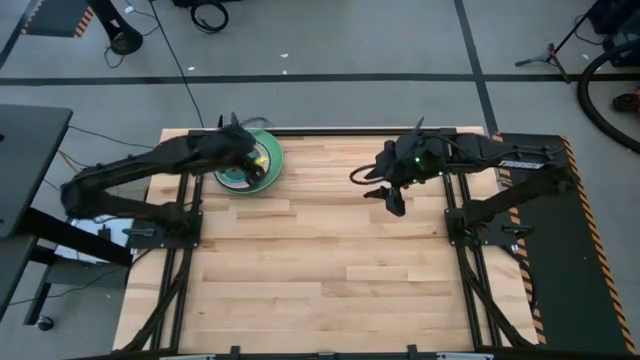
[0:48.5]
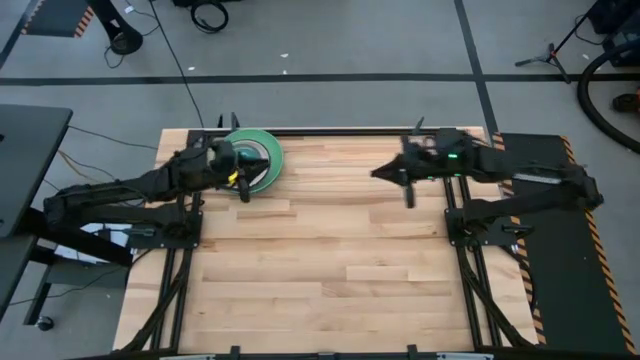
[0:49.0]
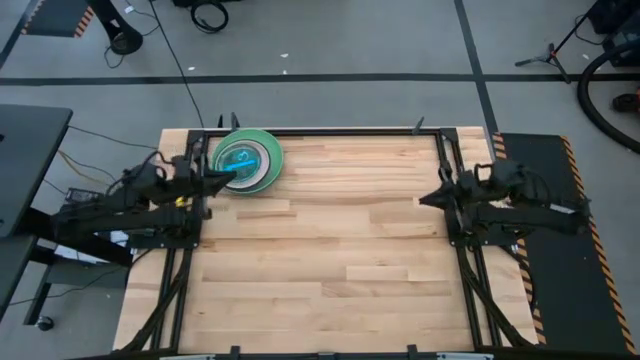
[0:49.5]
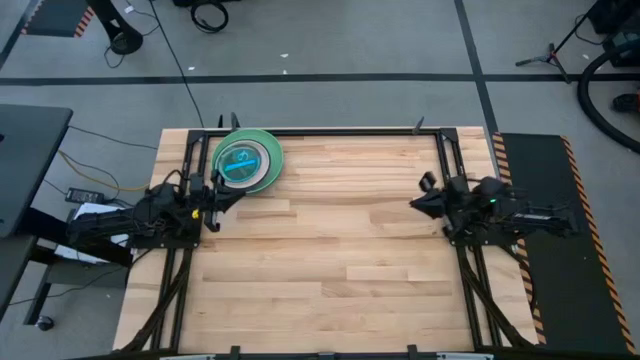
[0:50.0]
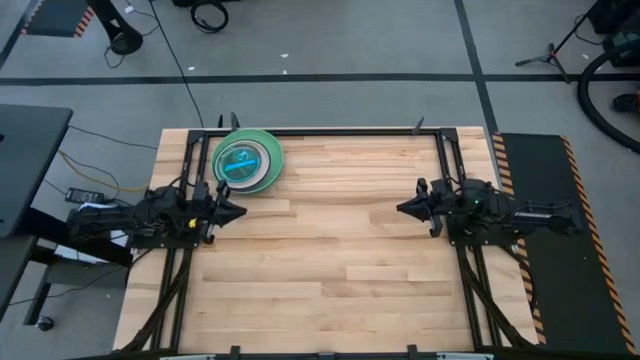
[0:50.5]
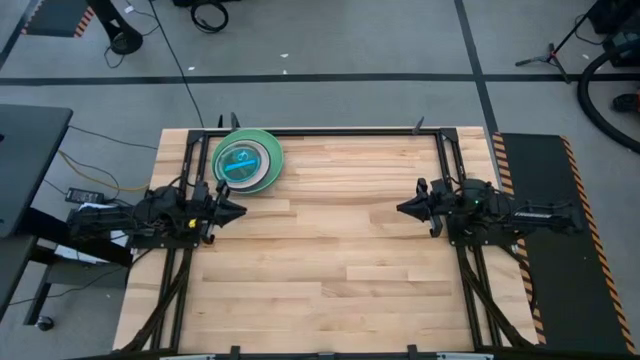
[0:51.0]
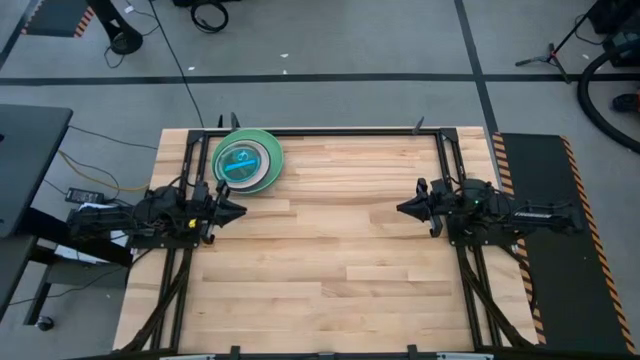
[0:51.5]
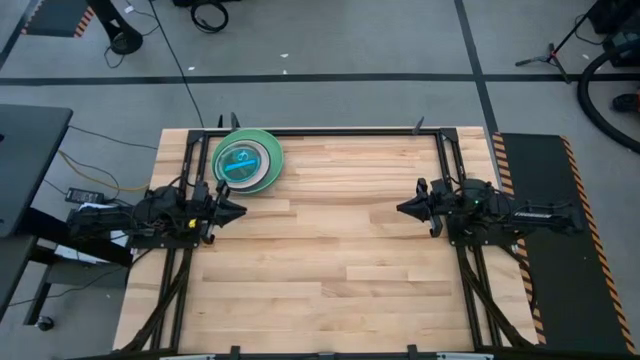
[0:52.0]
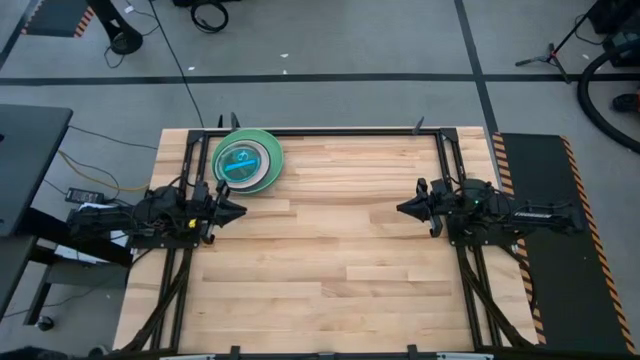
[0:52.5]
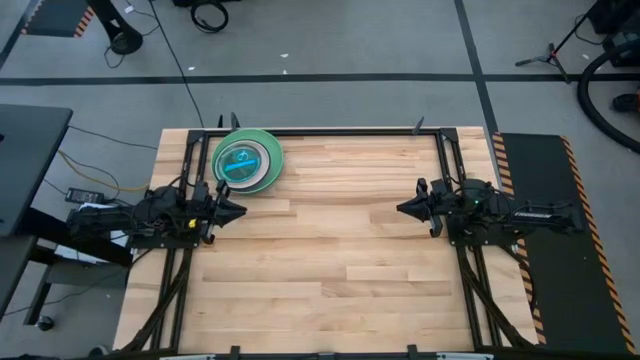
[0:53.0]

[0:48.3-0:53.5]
Task: Stack plastic plates
Return to Home Position

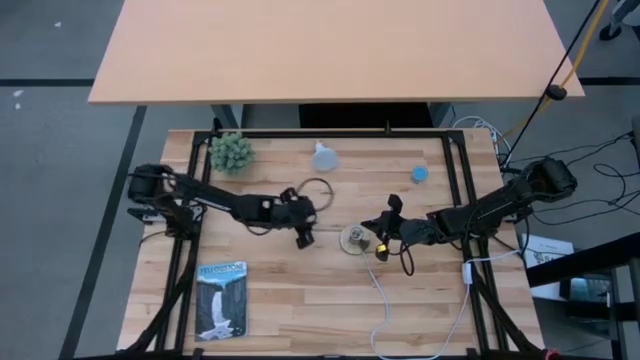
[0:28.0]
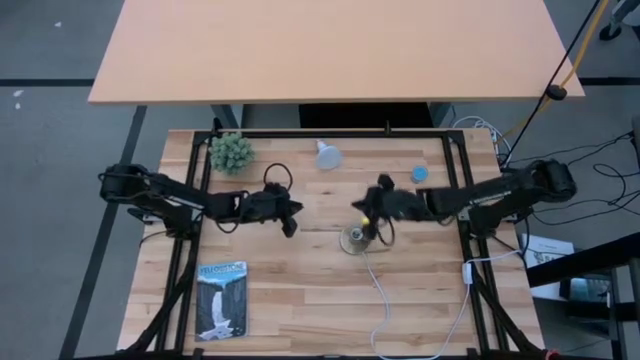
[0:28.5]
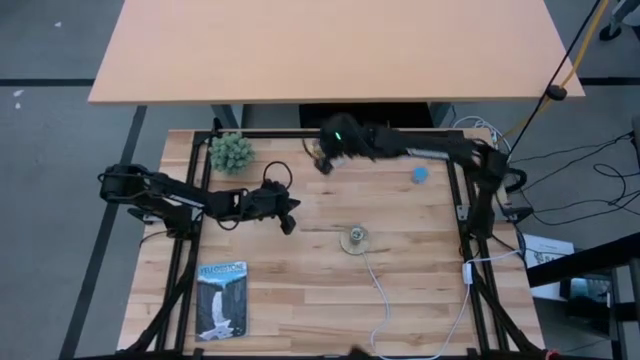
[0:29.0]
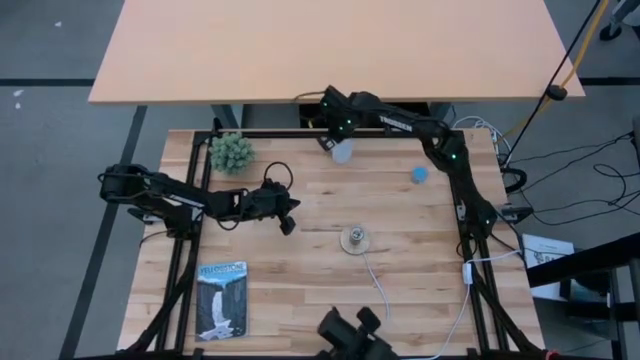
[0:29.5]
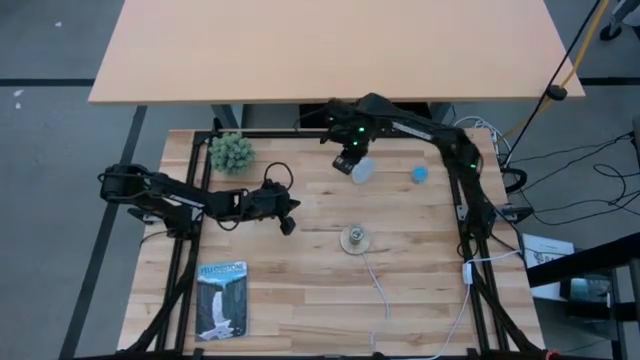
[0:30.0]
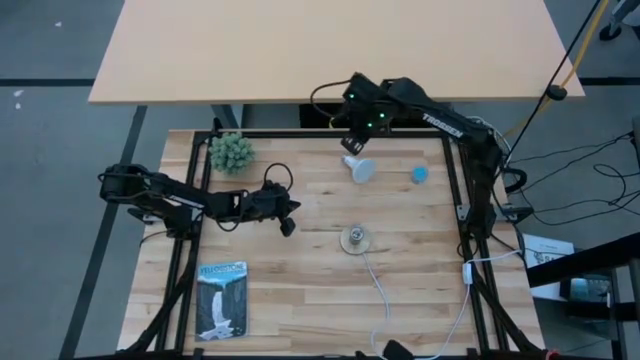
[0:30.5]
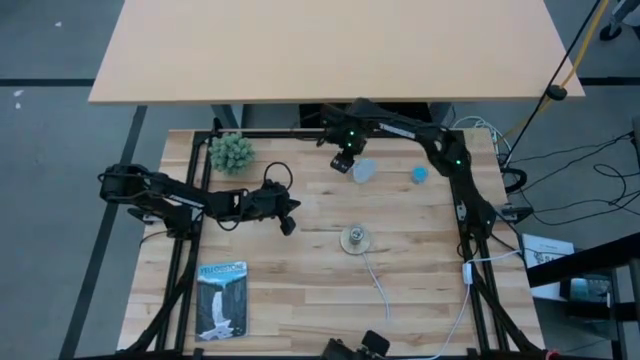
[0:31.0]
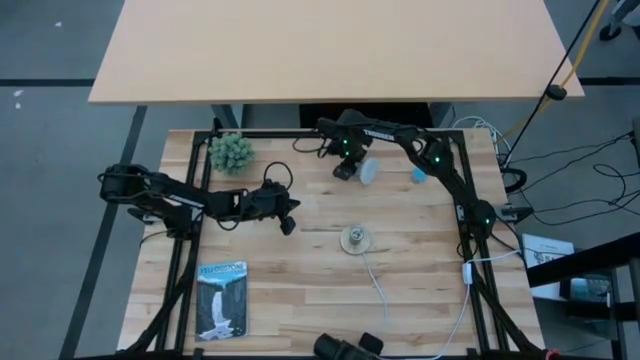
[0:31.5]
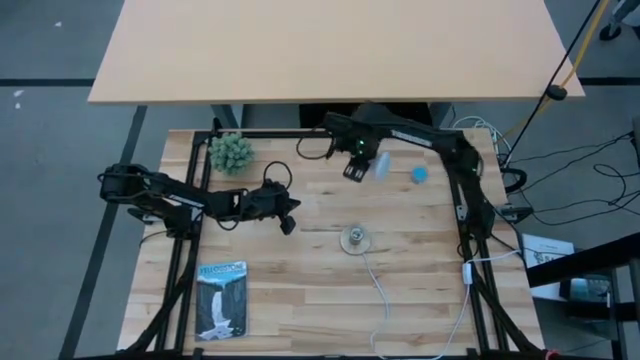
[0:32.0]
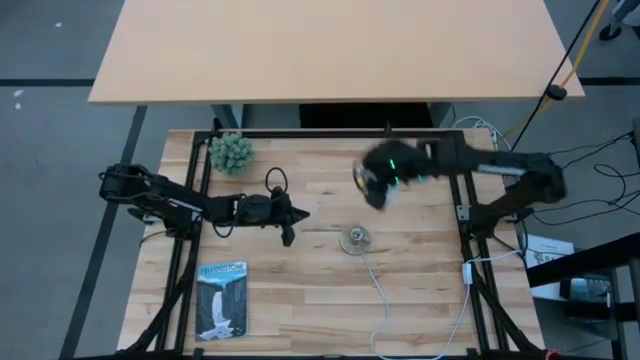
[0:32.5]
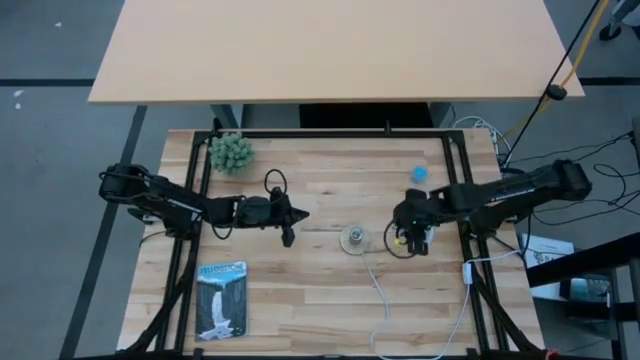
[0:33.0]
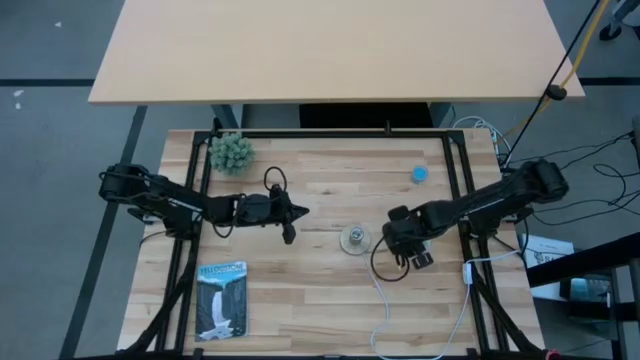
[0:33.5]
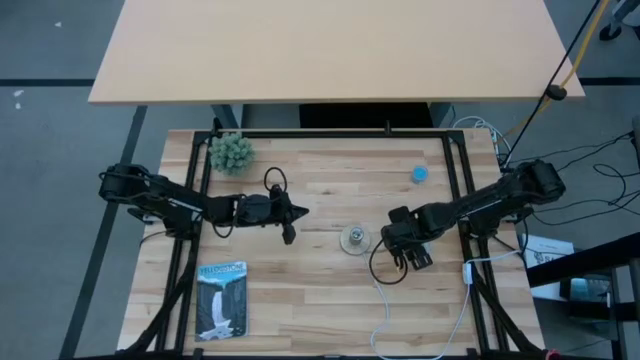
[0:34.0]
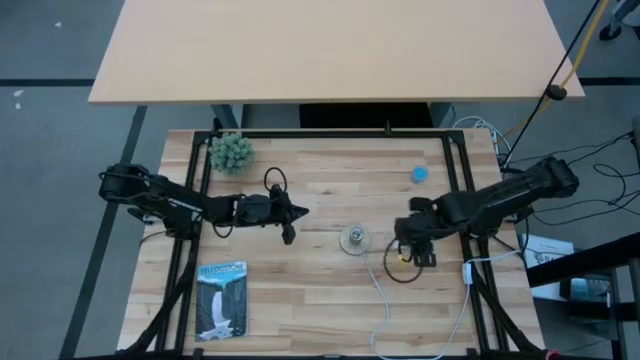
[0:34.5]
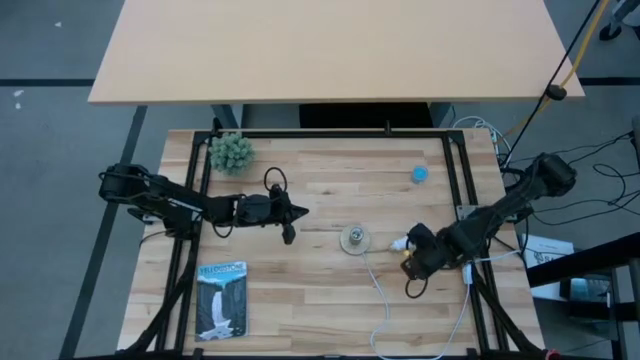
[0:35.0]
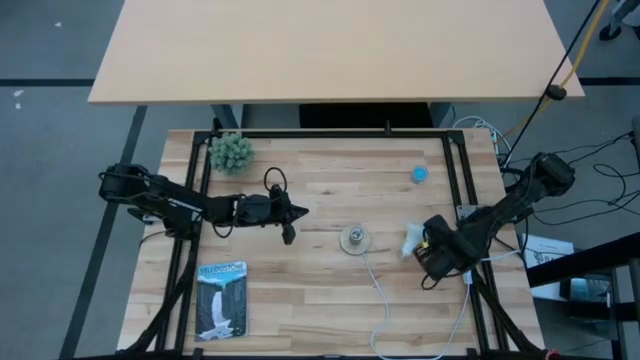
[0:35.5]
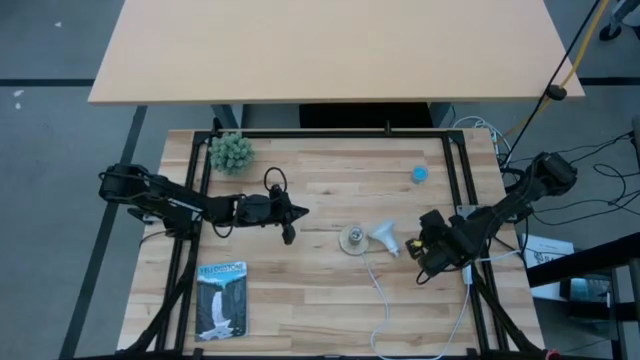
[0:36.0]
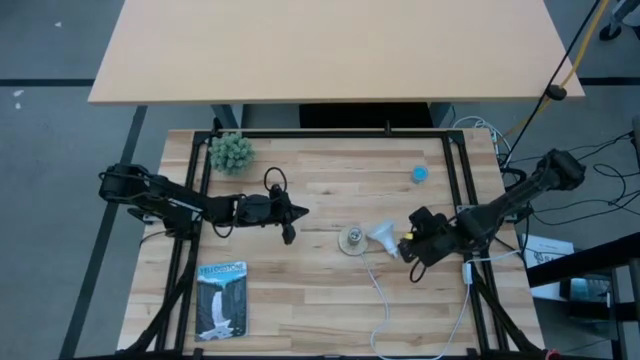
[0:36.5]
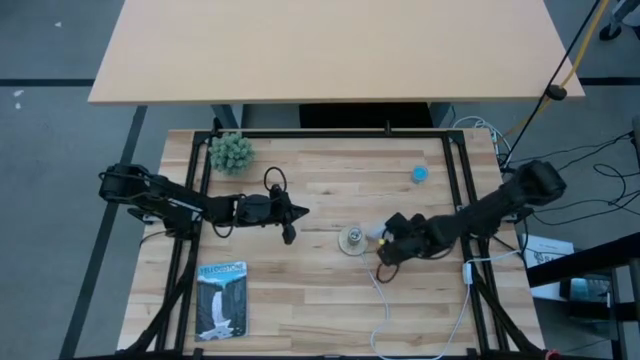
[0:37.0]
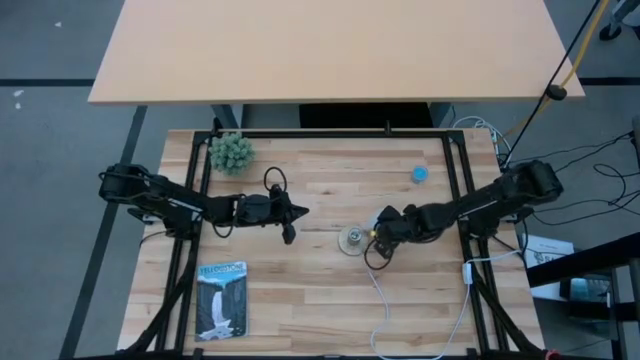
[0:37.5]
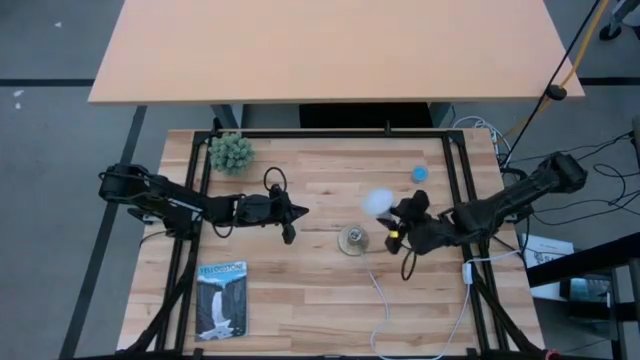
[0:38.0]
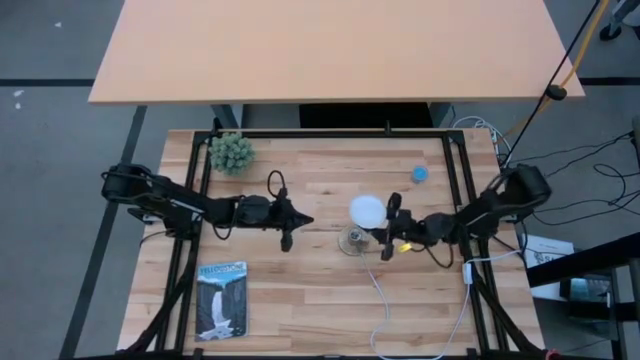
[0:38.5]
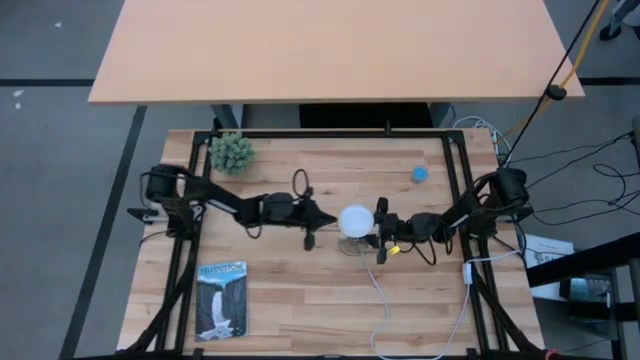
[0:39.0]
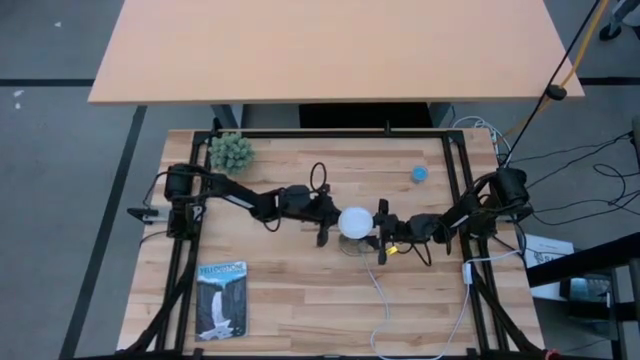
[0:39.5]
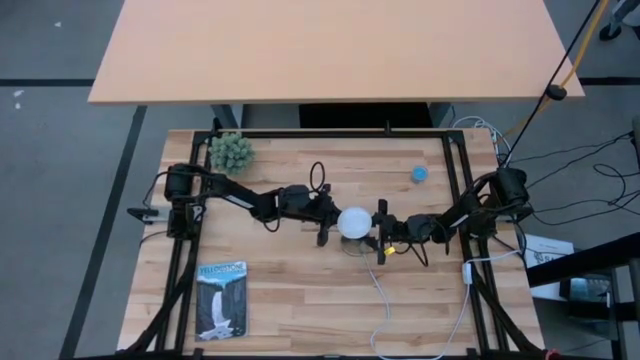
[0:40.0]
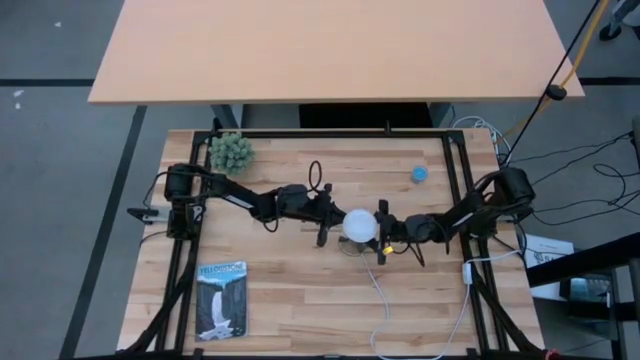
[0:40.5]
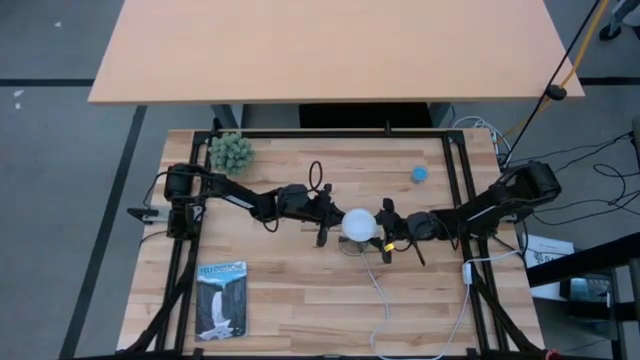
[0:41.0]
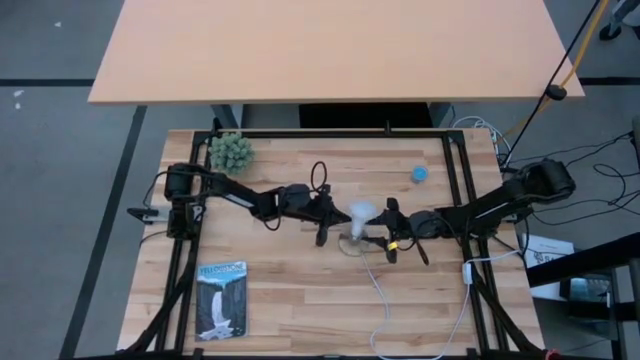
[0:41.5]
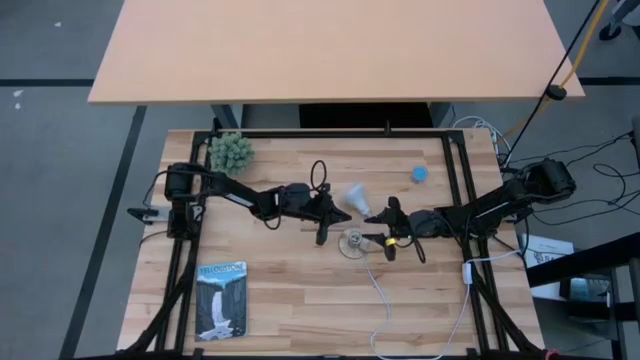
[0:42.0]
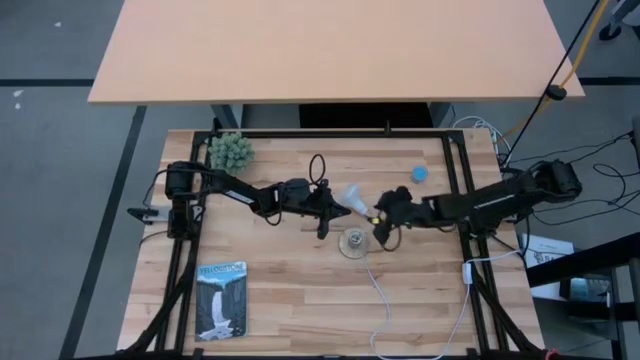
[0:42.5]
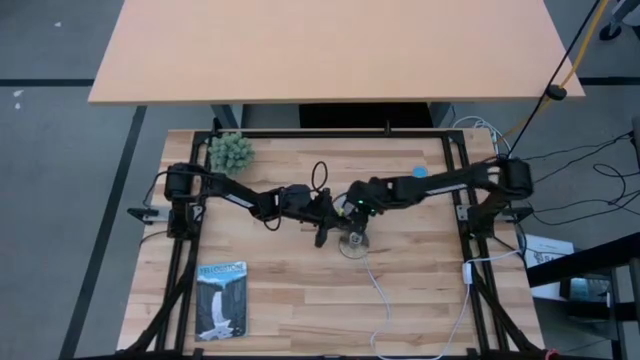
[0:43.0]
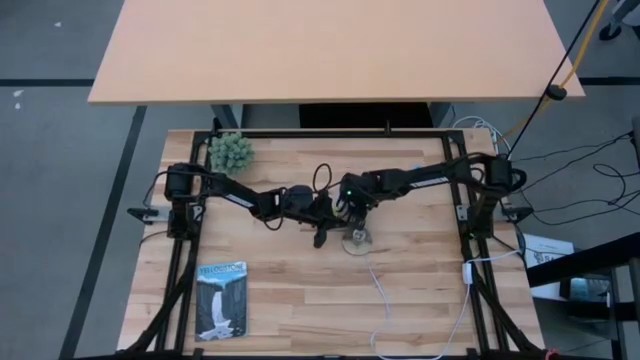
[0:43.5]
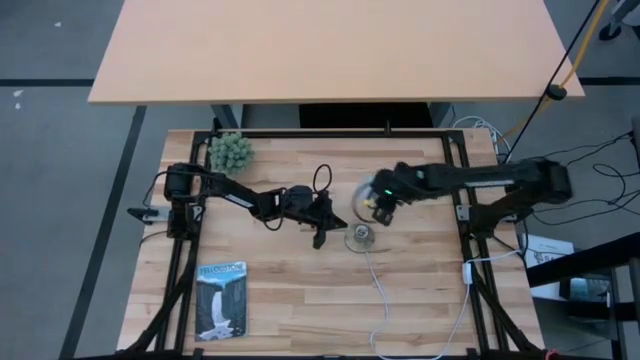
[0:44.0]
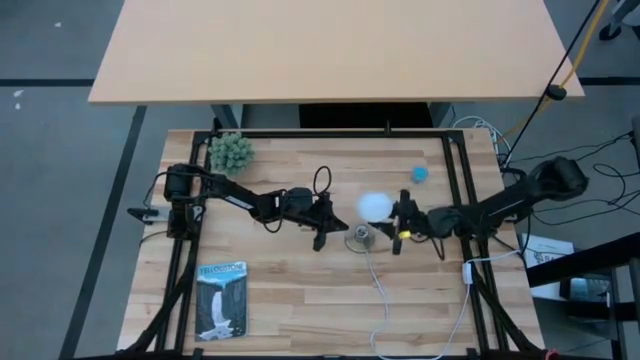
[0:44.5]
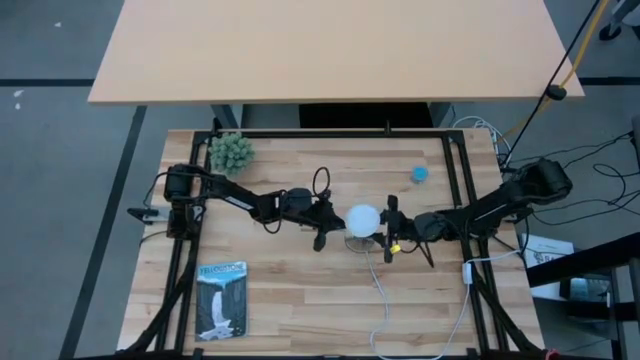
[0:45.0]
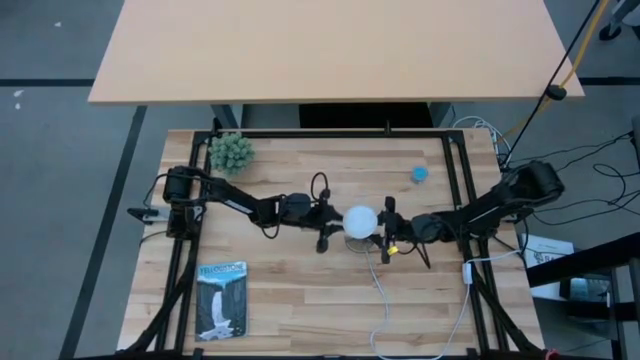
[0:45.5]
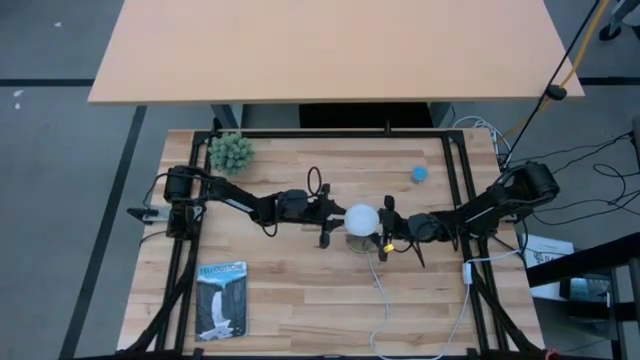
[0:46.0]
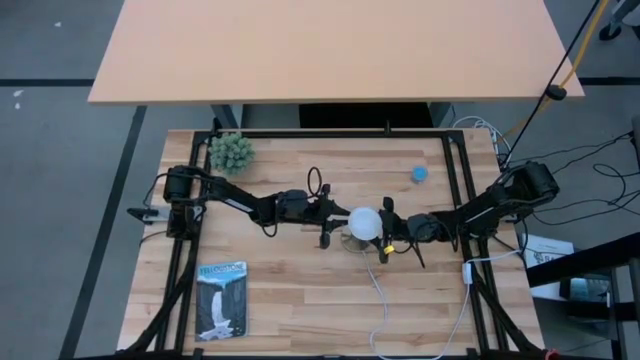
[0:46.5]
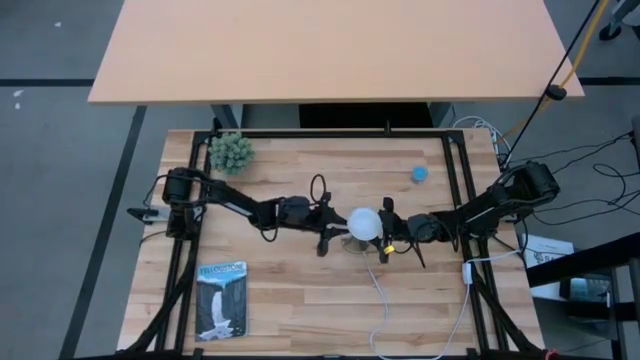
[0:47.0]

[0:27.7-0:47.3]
Task: Screw lightbulb
Insert the lightbulb into the lamp
